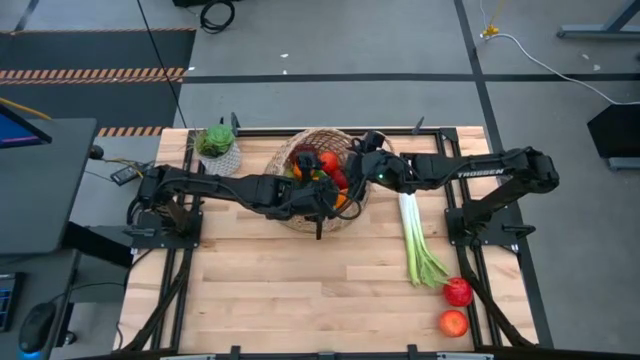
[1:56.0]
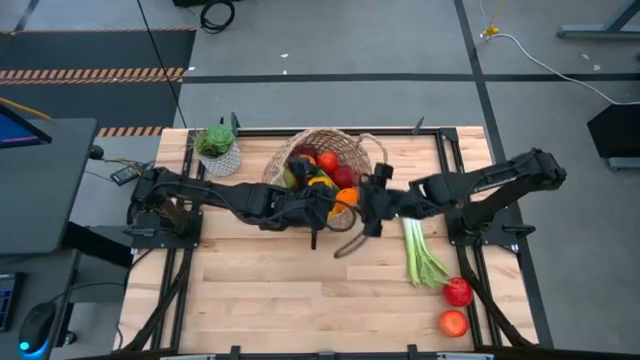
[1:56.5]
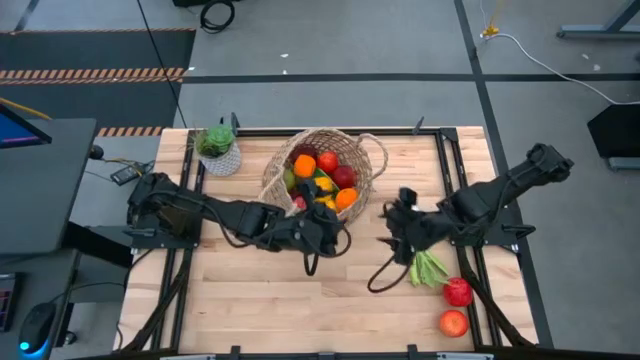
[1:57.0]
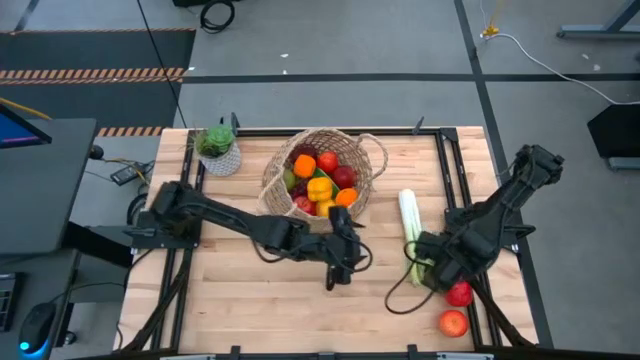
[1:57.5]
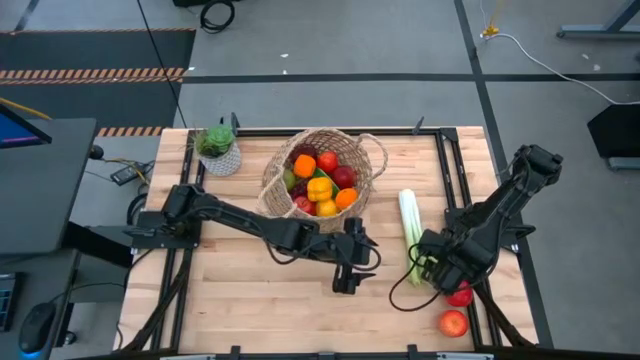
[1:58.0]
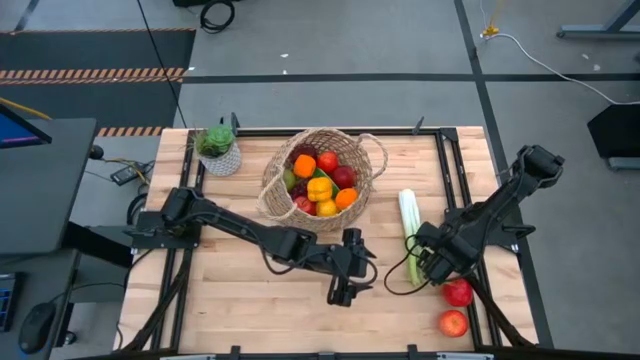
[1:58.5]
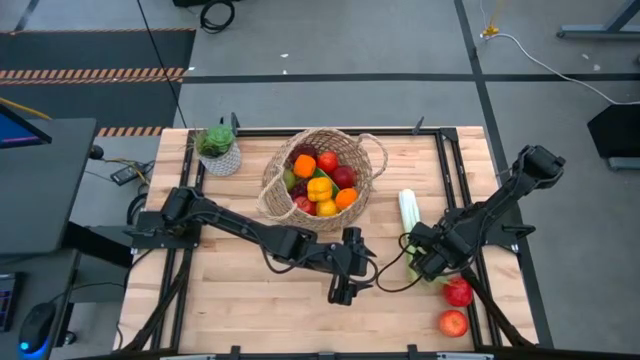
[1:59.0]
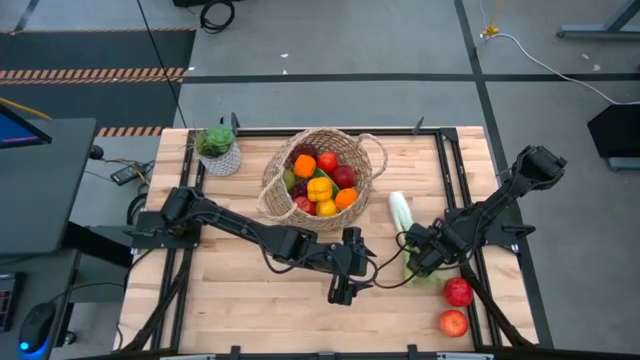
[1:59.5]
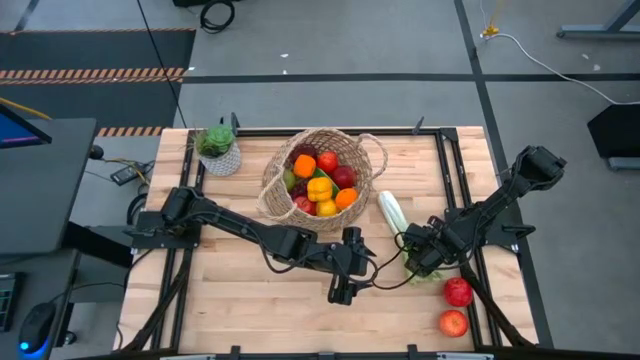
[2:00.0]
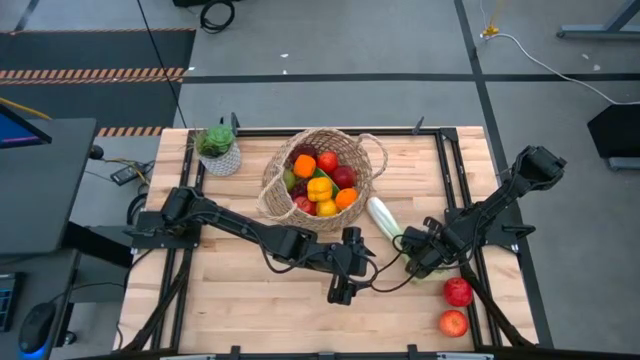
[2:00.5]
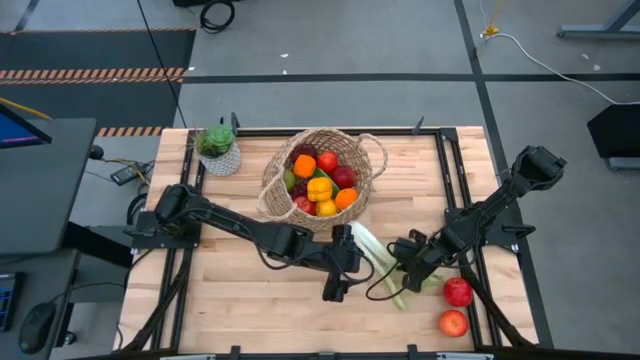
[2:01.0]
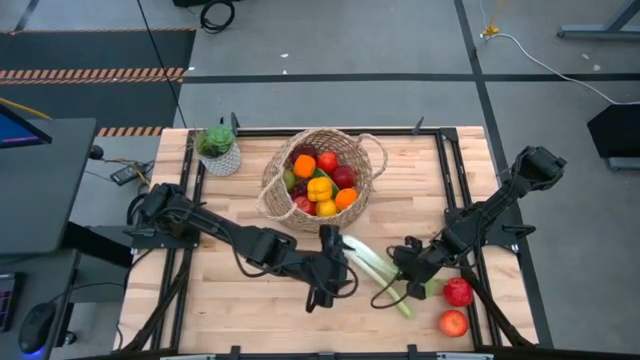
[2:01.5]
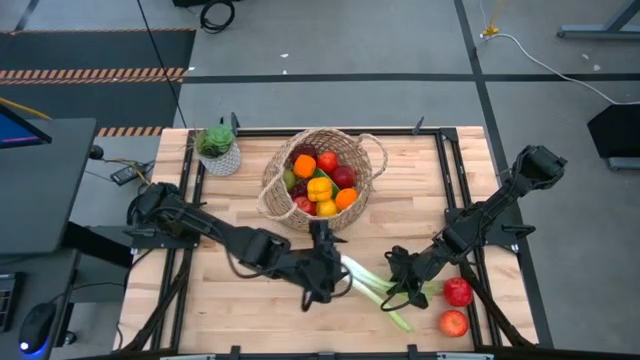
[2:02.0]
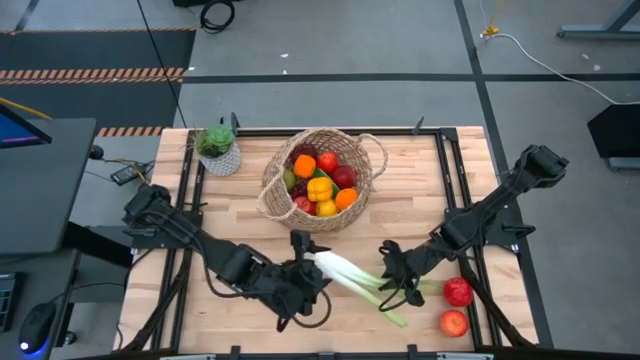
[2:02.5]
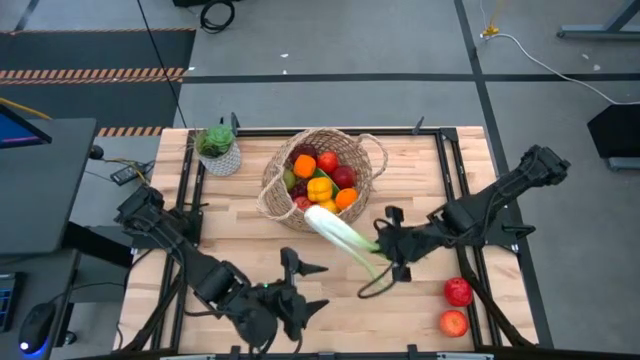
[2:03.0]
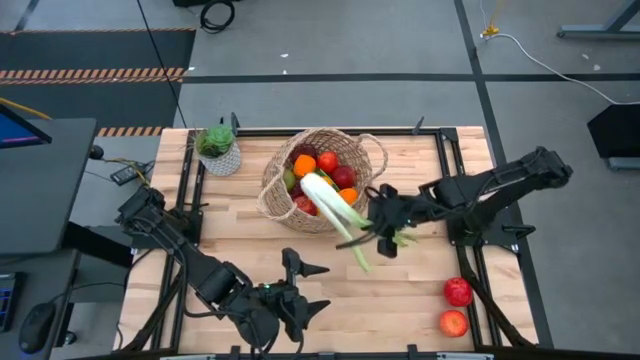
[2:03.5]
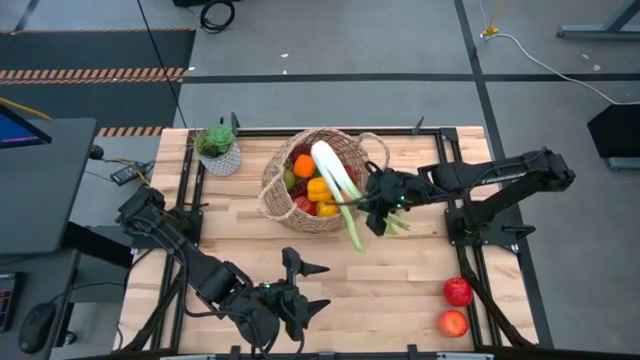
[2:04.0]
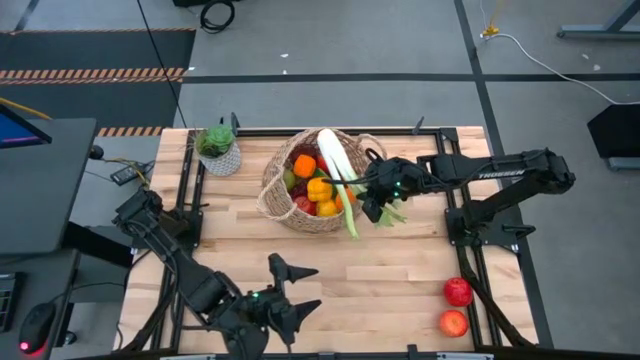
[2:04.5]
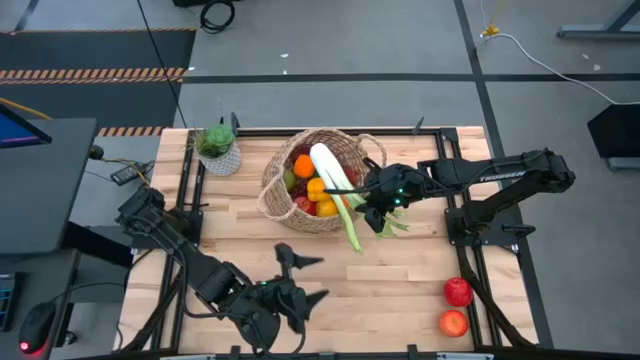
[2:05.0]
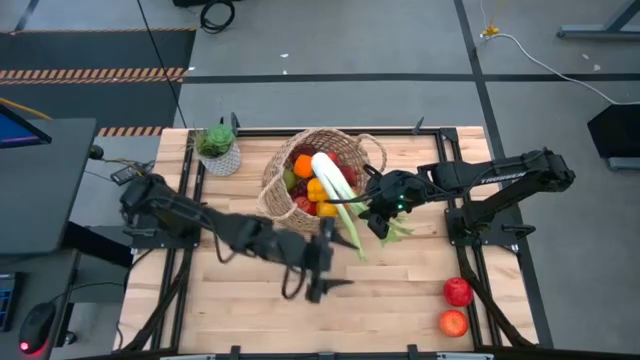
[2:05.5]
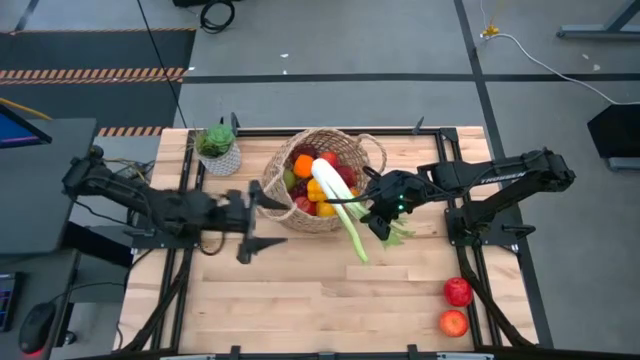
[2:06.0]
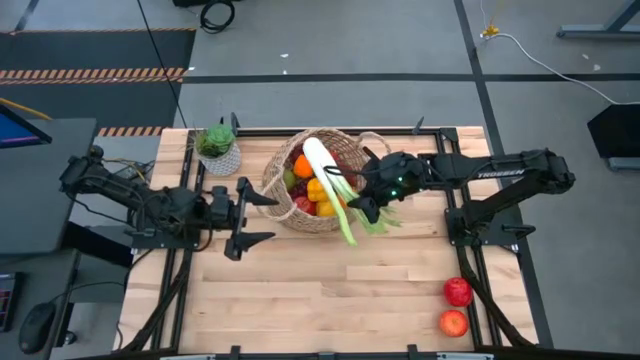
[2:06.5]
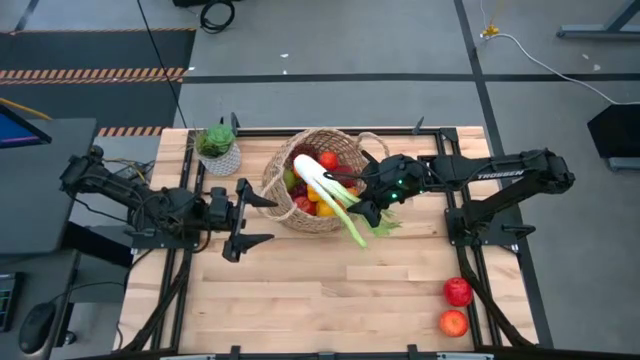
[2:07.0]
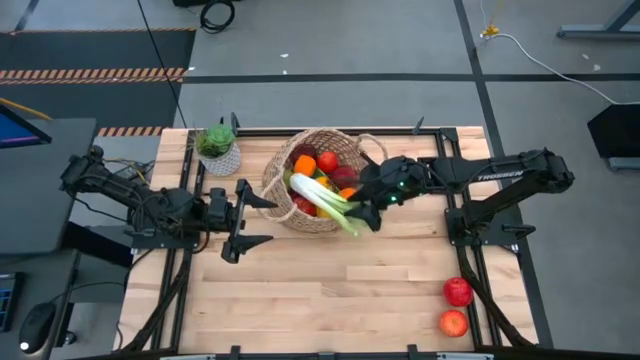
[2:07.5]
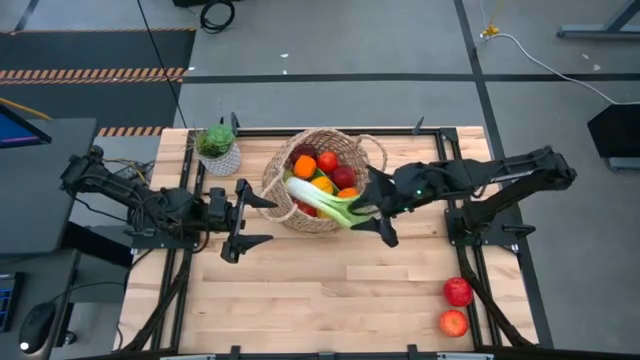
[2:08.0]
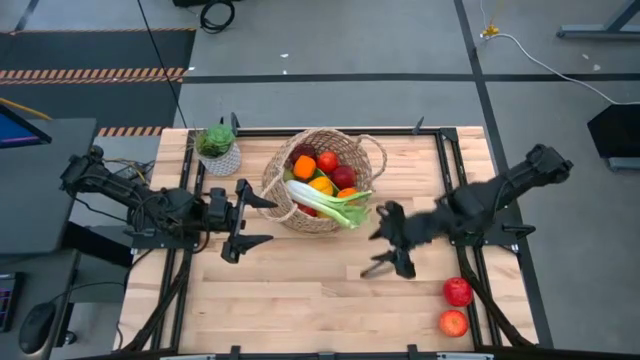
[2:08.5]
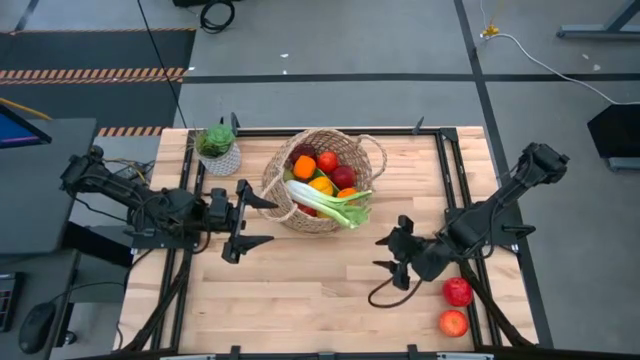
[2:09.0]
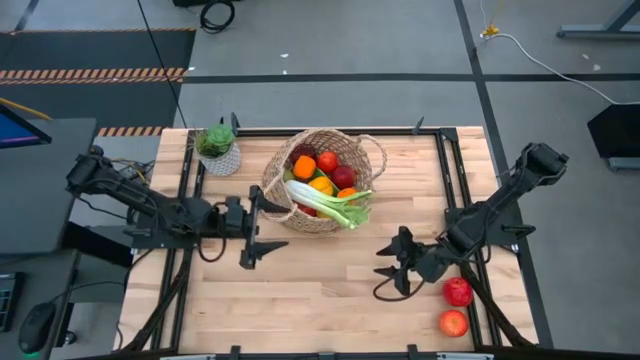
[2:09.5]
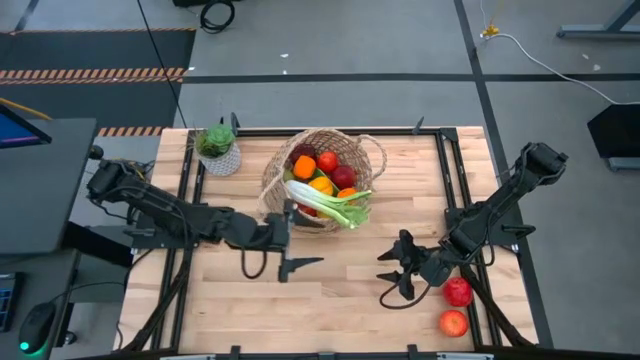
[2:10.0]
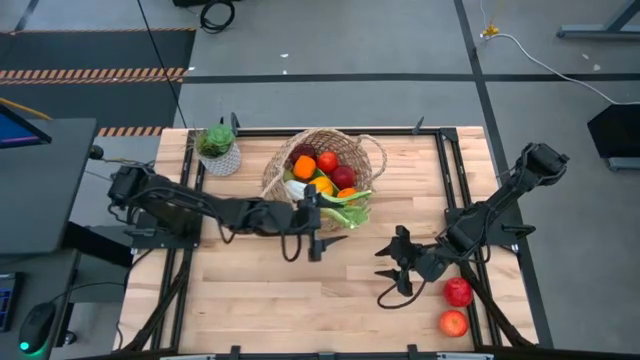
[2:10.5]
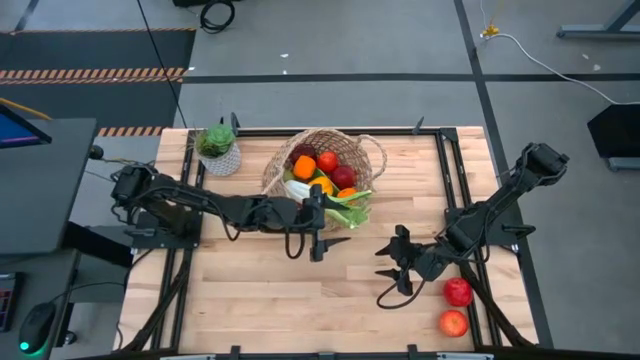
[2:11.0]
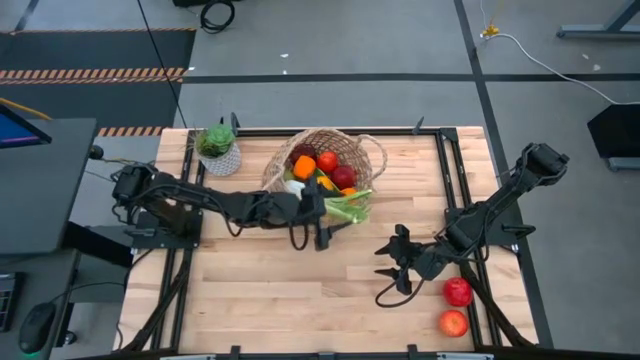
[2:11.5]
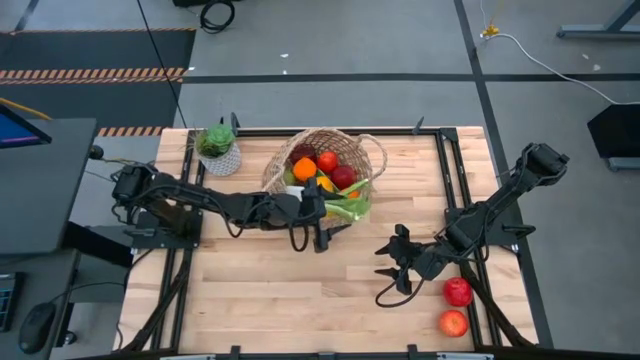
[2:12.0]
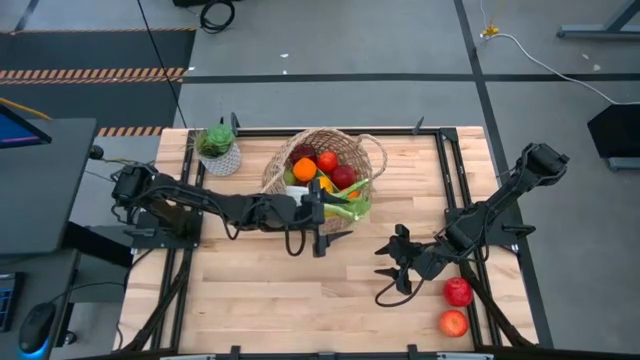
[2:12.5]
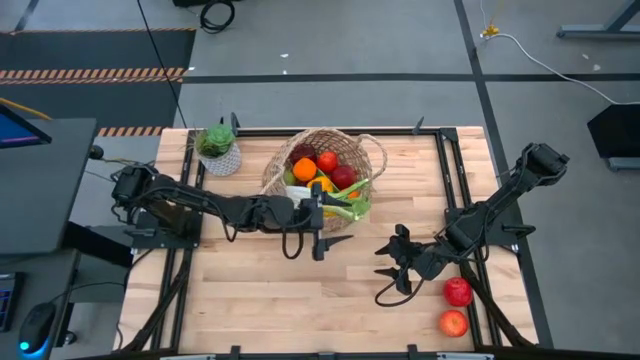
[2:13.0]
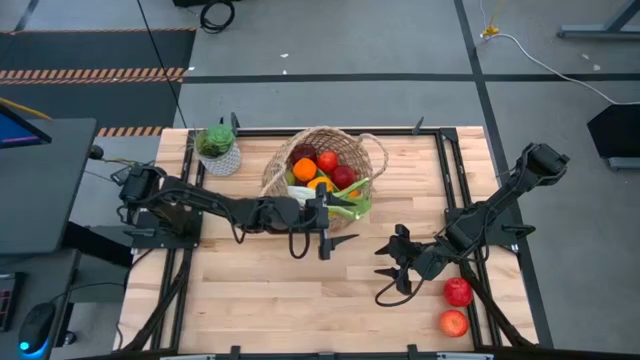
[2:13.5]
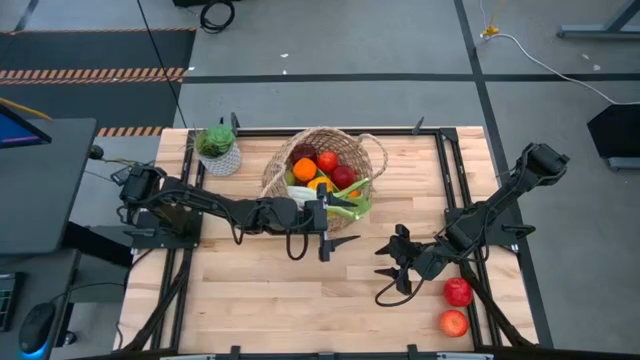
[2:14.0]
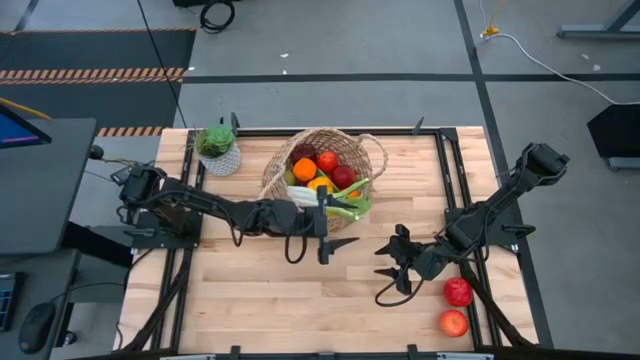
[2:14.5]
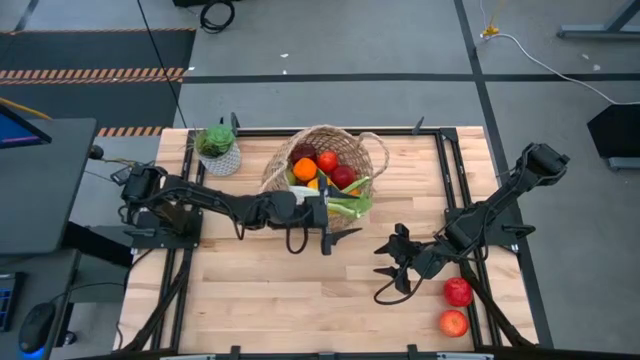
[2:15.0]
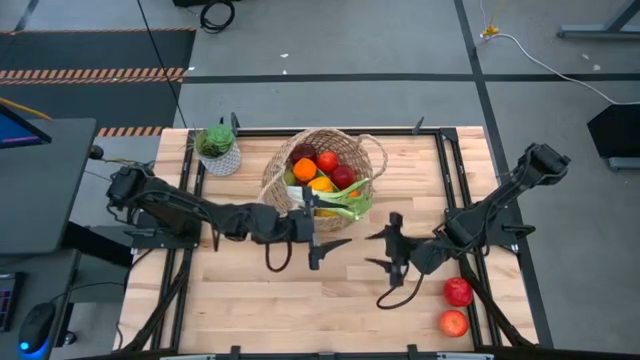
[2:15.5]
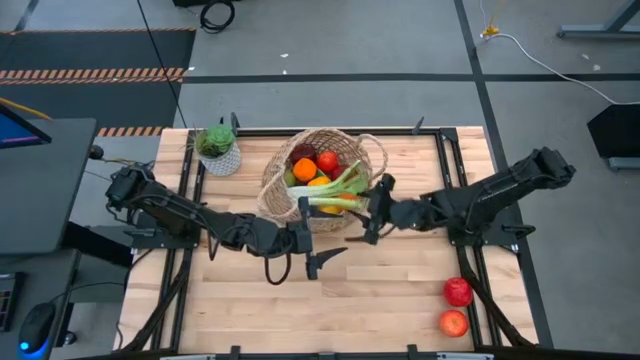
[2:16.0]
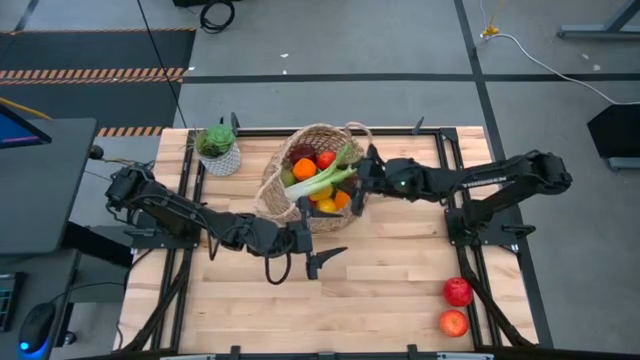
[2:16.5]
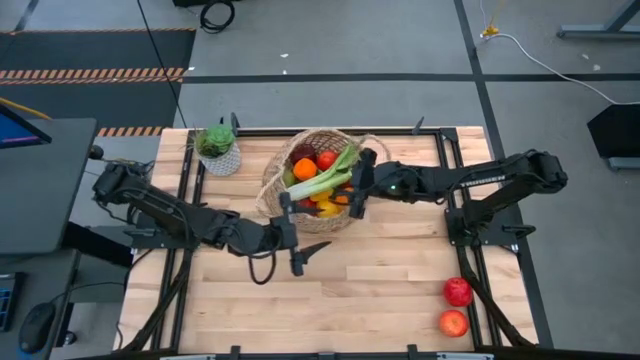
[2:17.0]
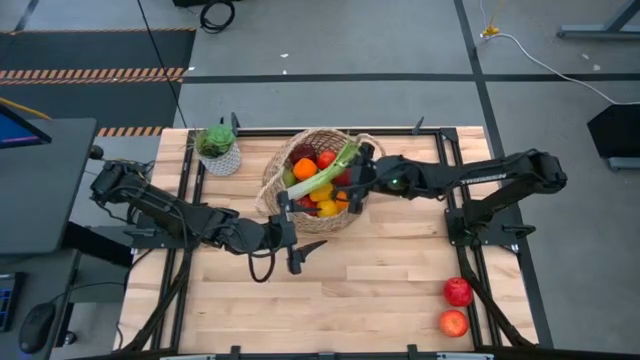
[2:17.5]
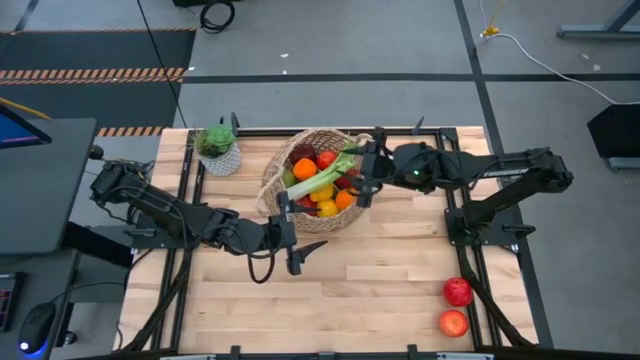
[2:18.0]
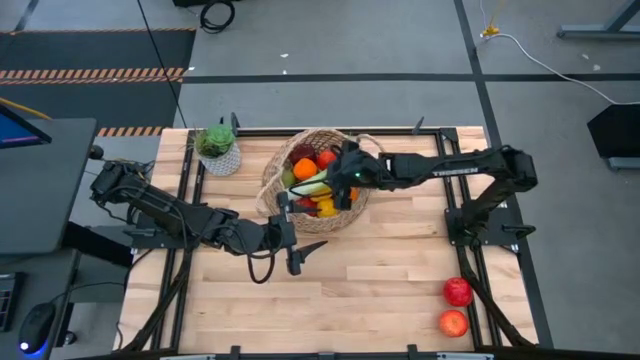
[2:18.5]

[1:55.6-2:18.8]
Task: Build produce basket
Put the celery into the basket
